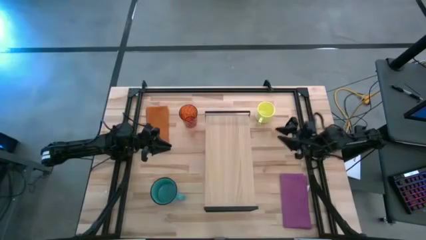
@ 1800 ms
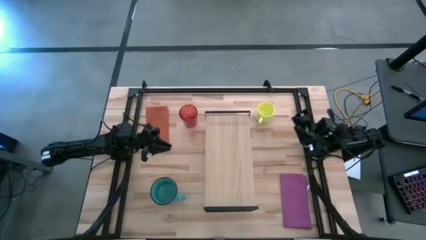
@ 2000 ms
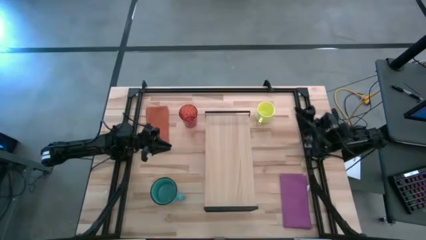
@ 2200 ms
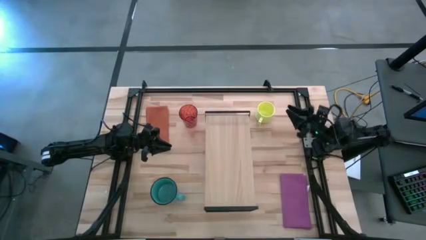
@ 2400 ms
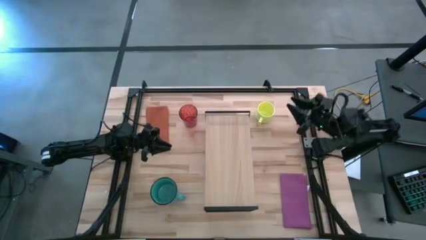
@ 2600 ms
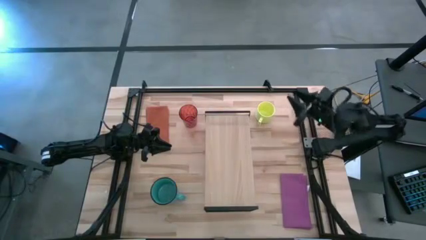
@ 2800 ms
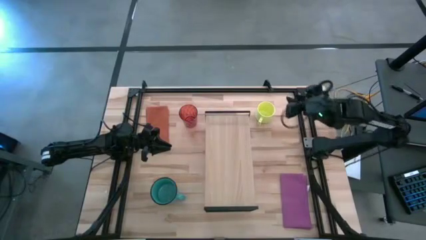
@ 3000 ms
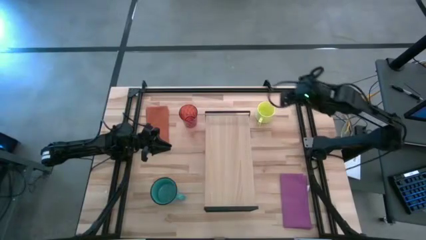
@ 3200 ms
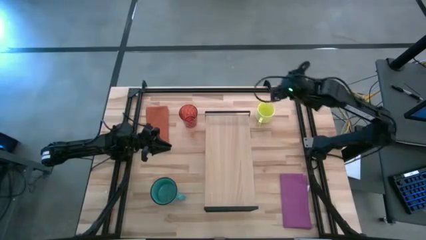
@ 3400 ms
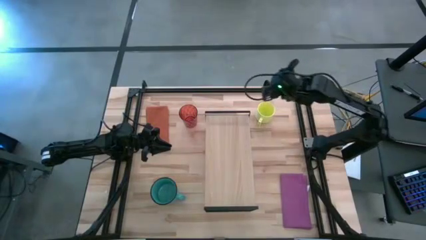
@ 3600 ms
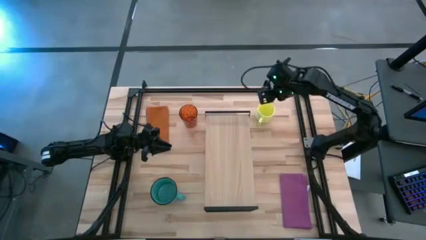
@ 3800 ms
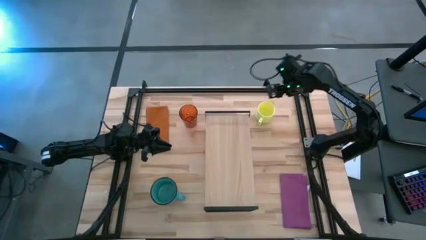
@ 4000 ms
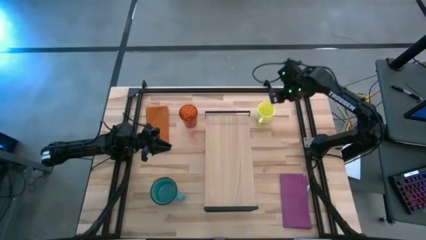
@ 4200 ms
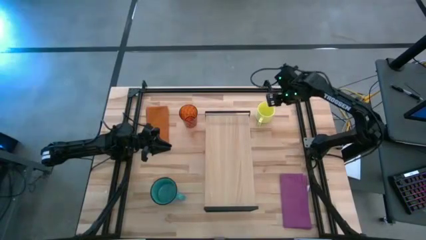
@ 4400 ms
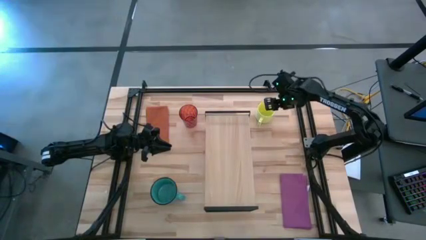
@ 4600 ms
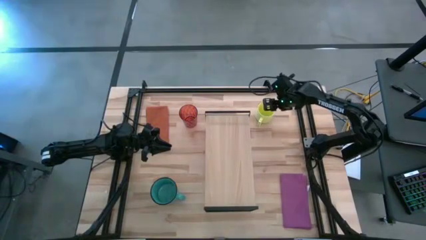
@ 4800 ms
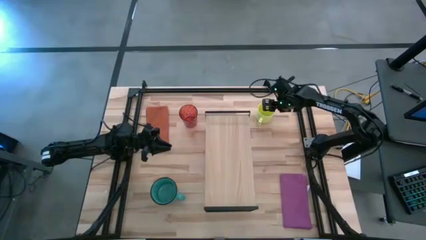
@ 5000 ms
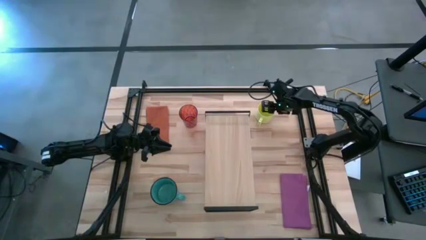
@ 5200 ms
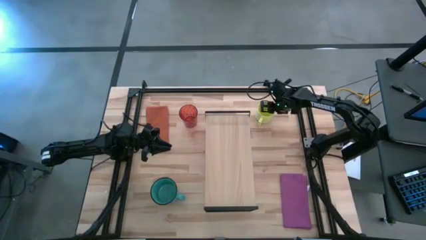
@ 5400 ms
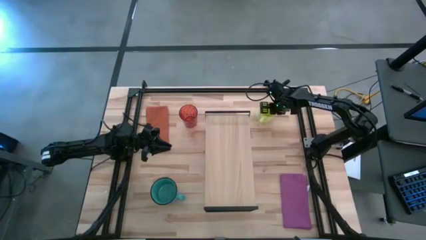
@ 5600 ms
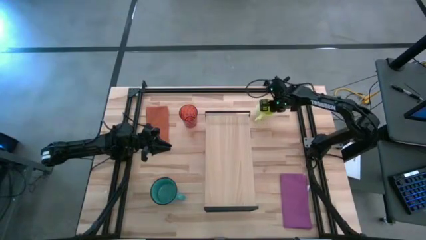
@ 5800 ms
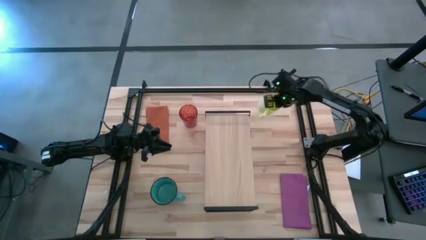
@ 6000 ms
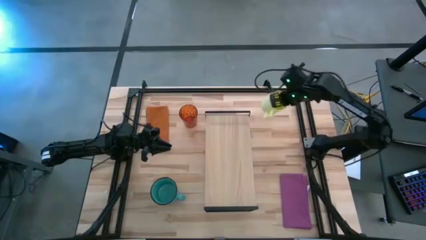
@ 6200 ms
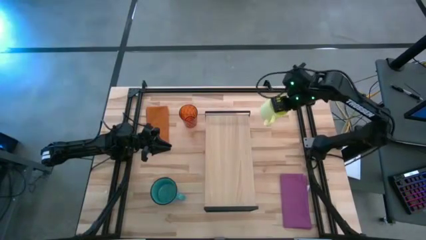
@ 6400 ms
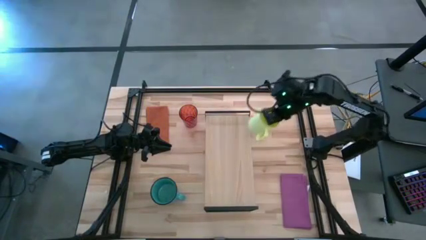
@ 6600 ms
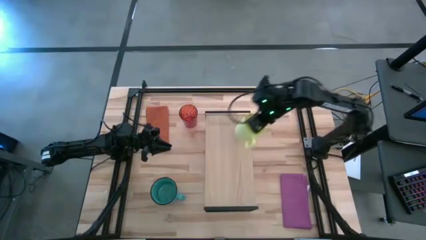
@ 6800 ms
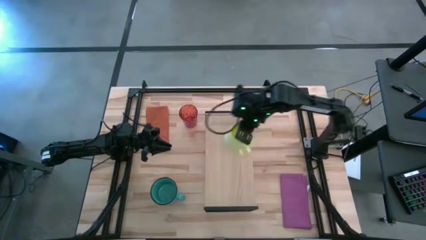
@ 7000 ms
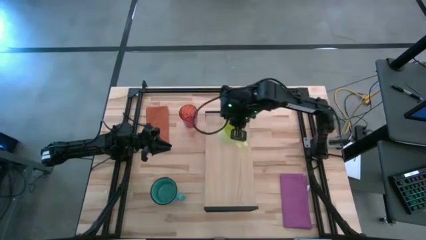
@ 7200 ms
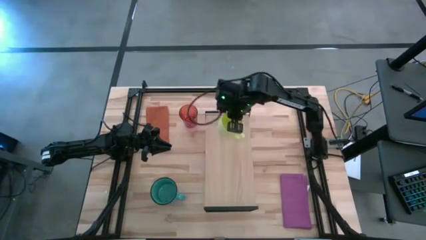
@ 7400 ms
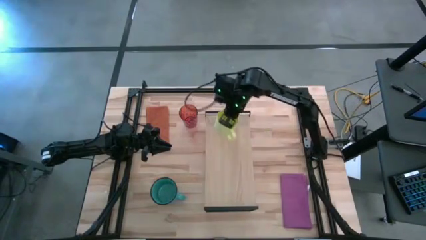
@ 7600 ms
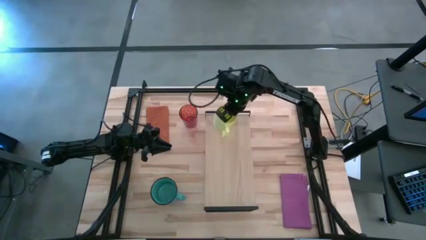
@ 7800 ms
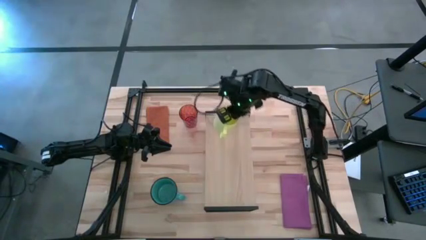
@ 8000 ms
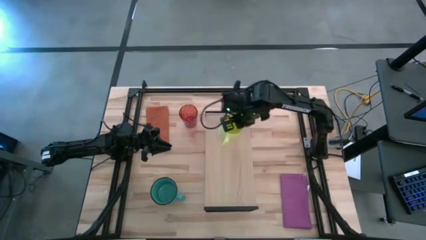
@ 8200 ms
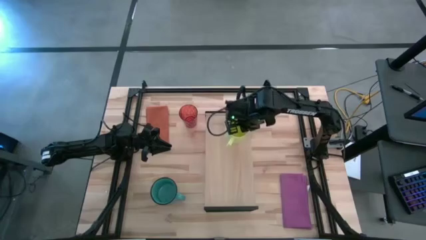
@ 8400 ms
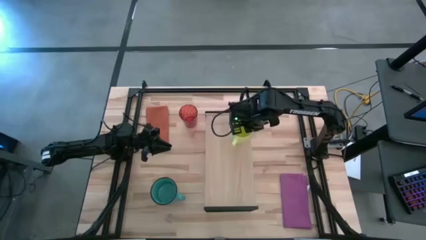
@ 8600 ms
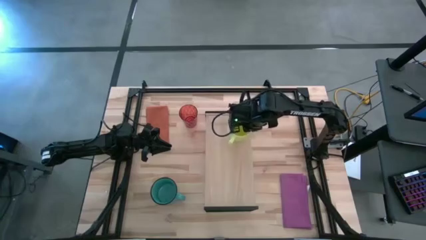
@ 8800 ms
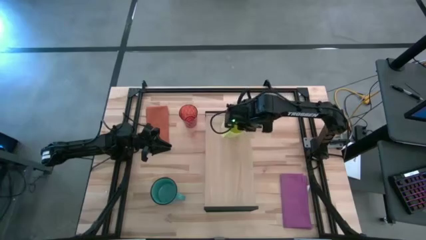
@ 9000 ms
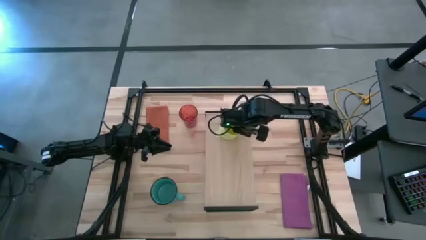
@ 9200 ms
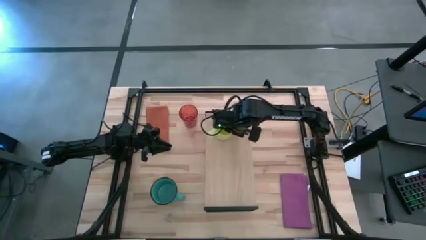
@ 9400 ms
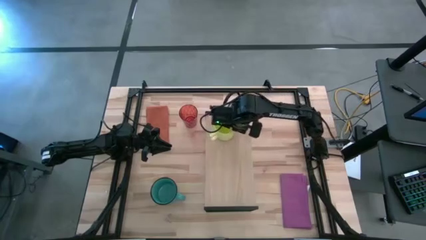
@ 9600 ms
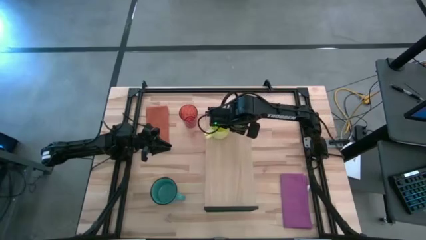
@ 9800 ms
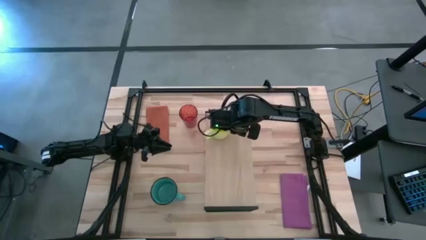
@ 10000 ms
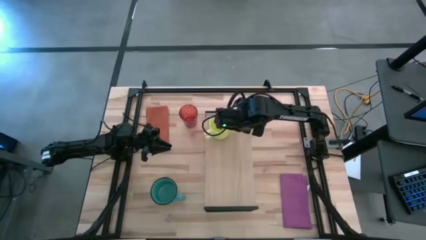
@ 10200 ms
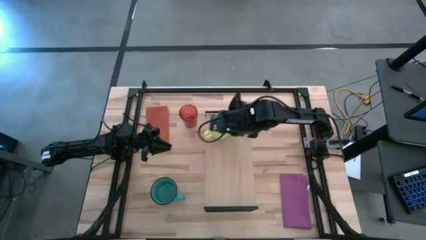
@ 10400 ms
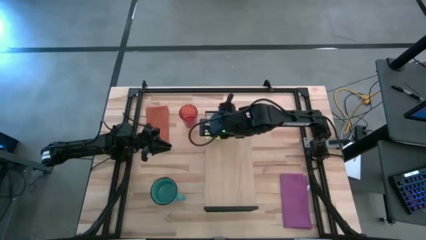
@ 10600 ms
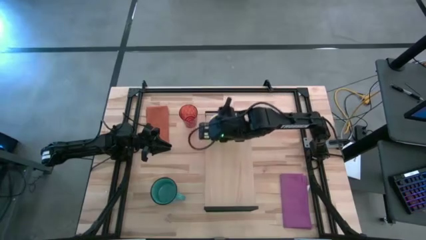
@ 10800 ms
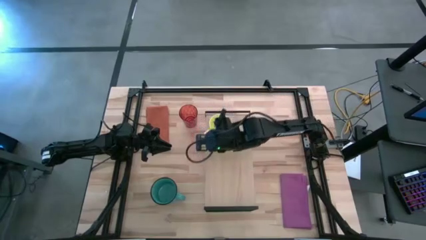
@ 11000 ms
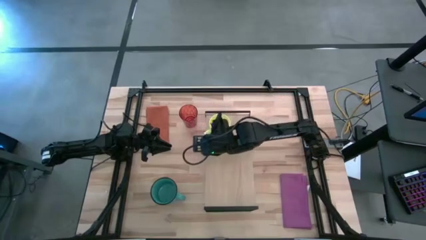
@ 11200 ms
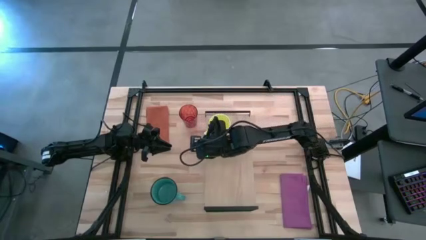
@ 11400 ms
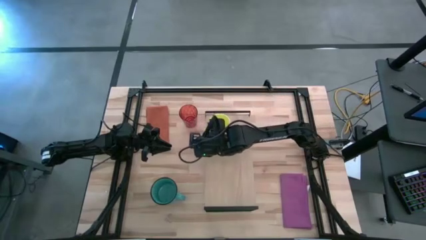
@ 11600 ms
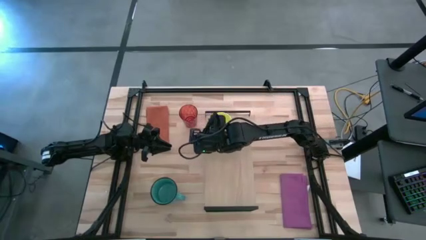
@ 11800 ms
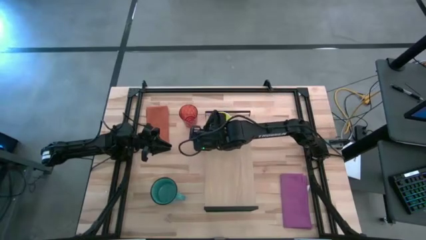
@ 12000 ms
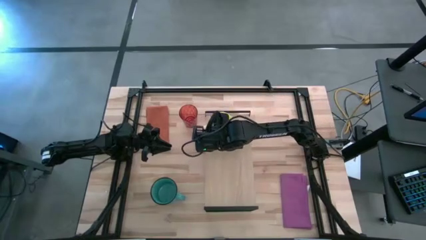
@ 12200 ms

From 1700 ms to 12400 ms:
Task: Stack small to large cups/mugs on shelf
Put the yellow mug on the shelf
